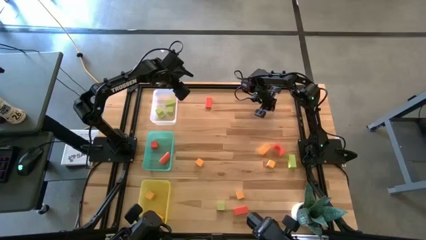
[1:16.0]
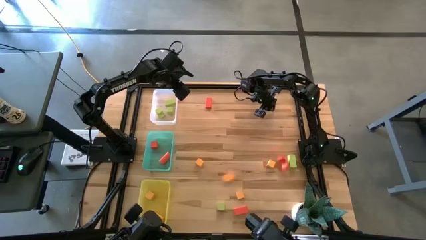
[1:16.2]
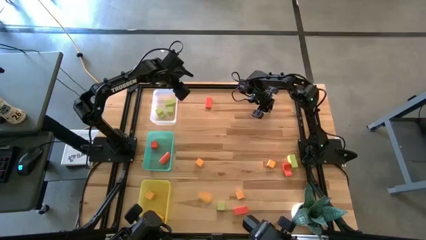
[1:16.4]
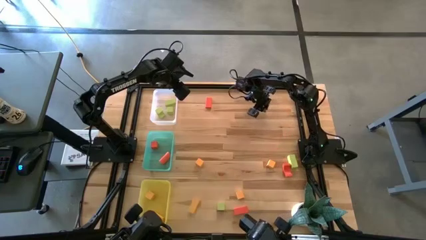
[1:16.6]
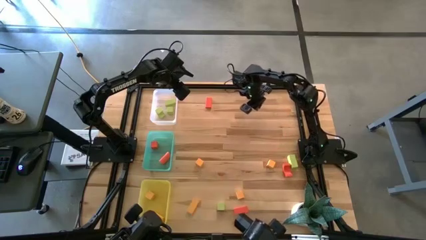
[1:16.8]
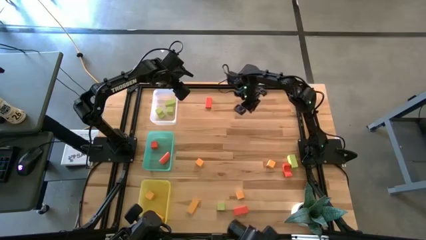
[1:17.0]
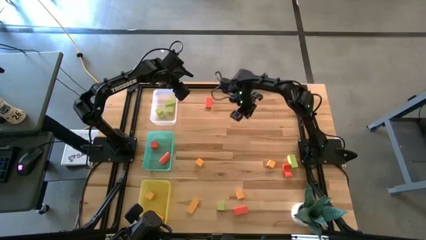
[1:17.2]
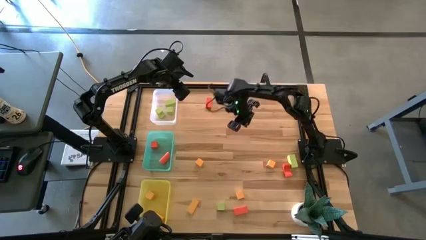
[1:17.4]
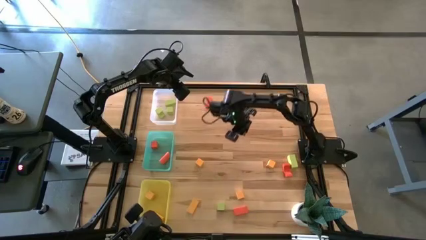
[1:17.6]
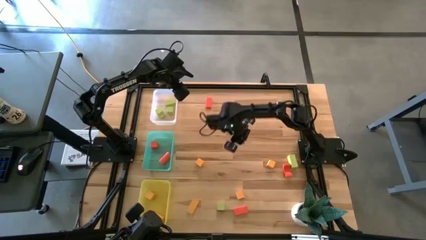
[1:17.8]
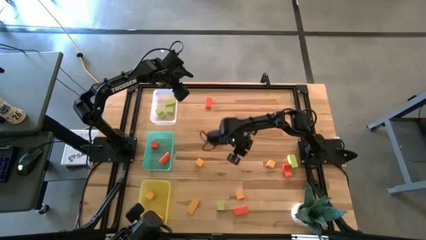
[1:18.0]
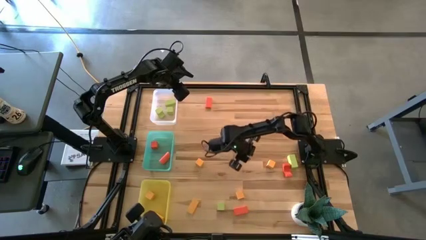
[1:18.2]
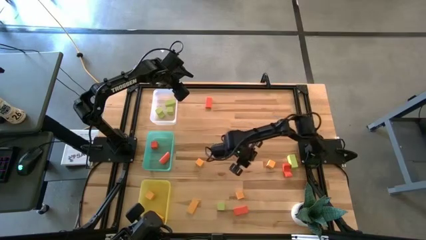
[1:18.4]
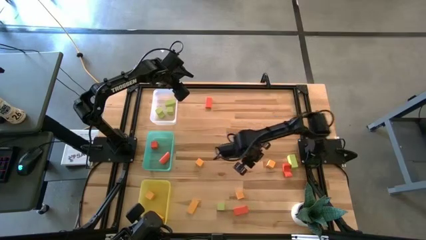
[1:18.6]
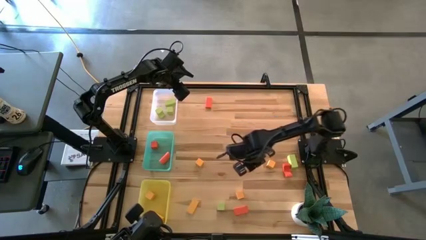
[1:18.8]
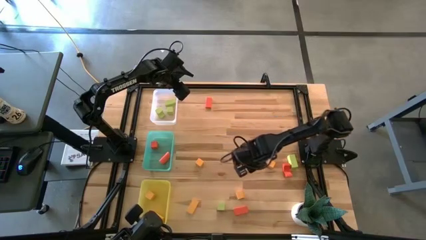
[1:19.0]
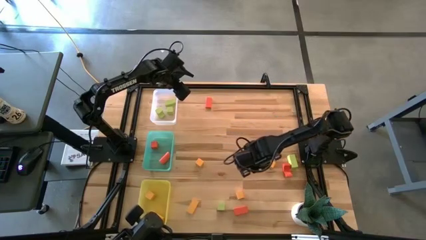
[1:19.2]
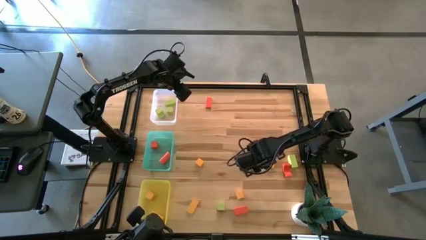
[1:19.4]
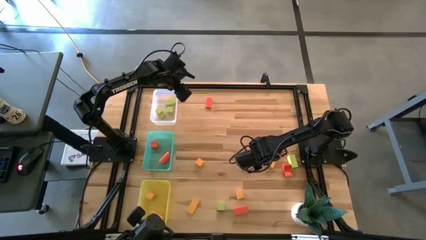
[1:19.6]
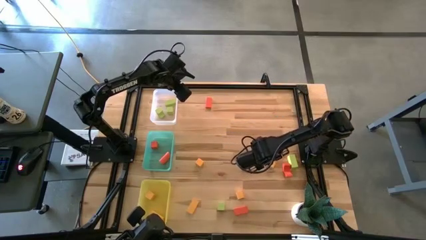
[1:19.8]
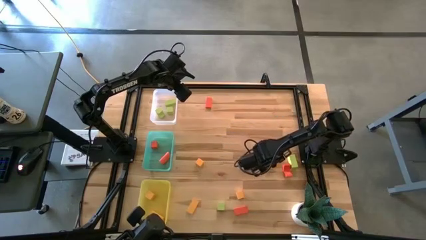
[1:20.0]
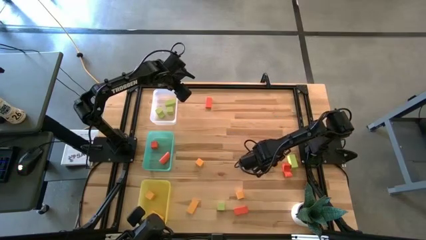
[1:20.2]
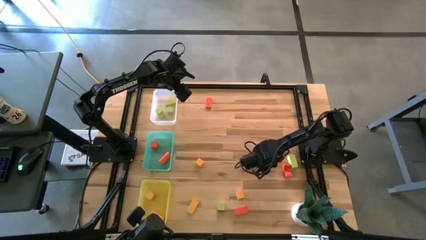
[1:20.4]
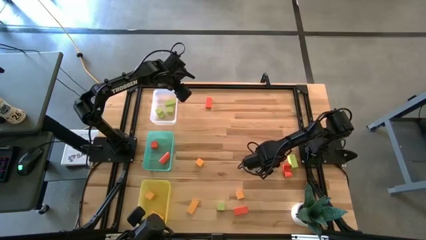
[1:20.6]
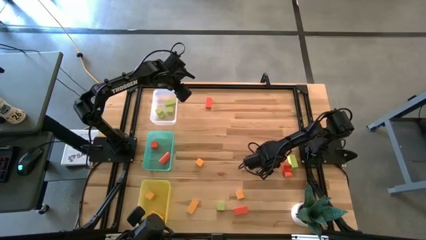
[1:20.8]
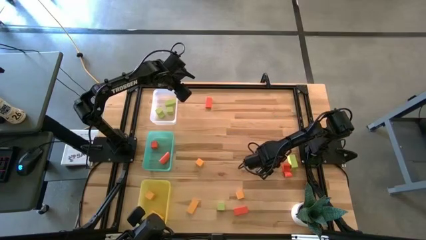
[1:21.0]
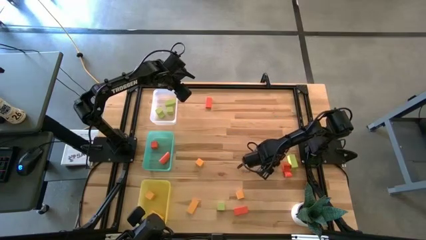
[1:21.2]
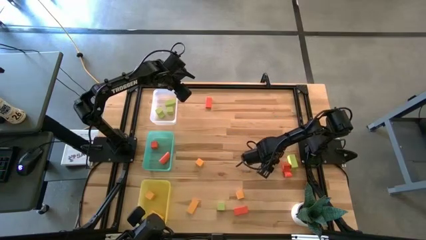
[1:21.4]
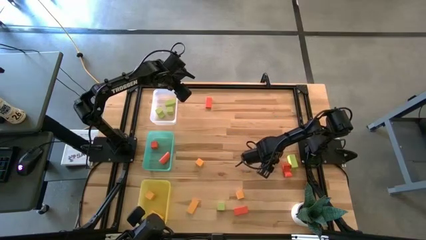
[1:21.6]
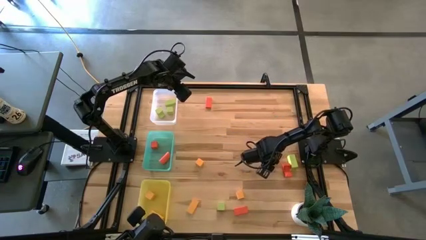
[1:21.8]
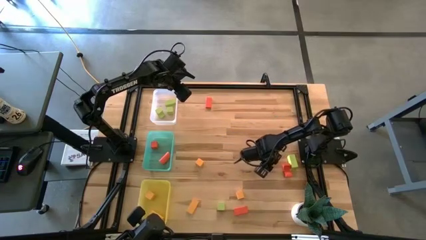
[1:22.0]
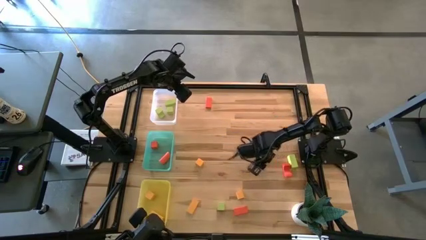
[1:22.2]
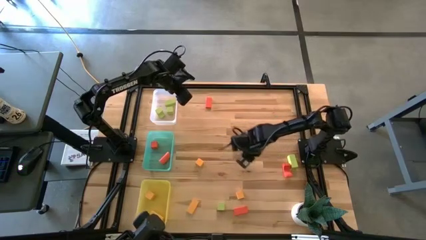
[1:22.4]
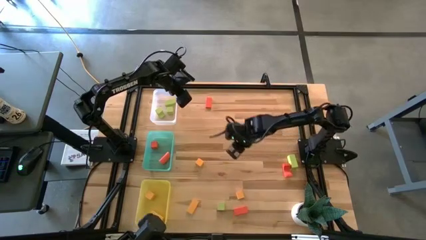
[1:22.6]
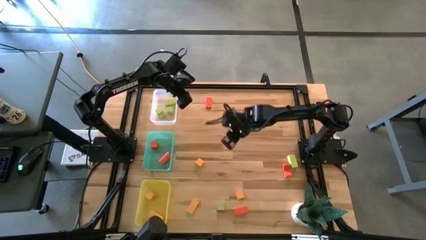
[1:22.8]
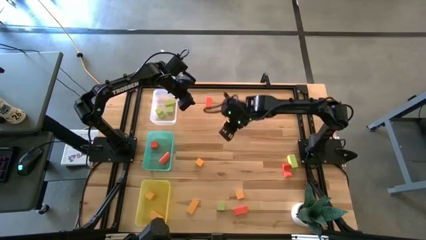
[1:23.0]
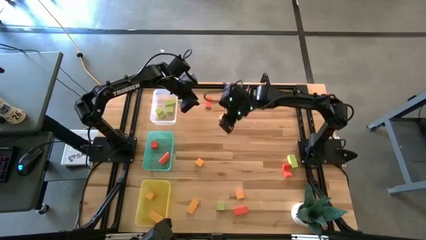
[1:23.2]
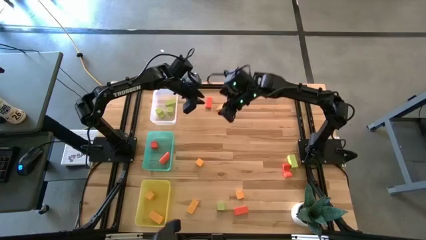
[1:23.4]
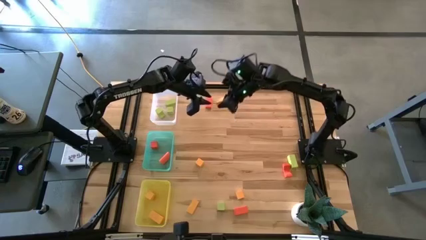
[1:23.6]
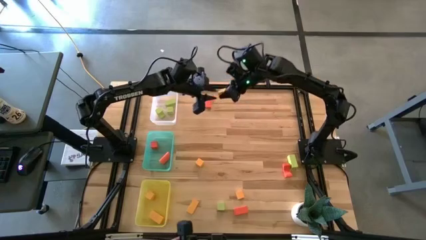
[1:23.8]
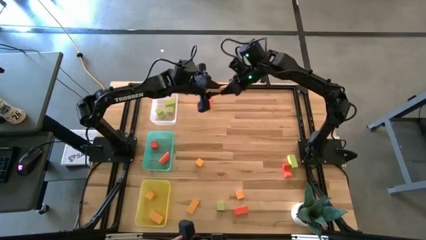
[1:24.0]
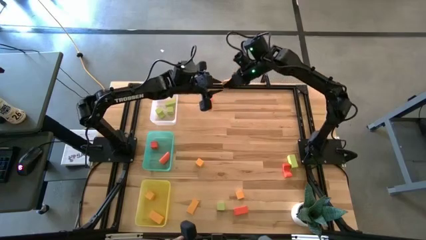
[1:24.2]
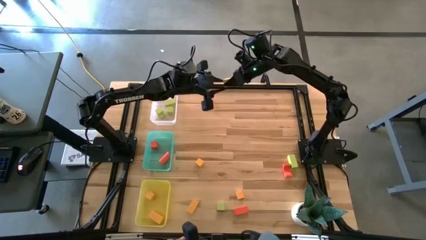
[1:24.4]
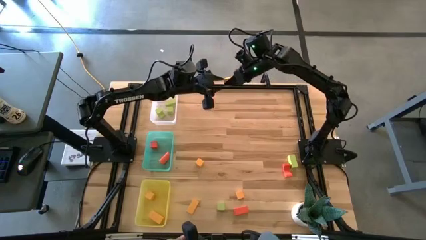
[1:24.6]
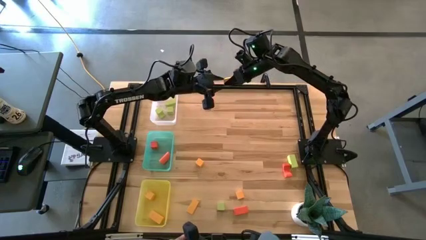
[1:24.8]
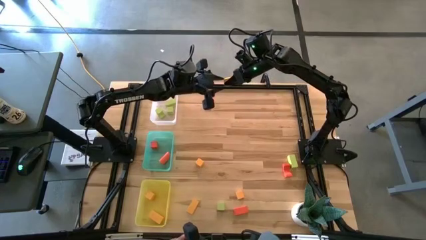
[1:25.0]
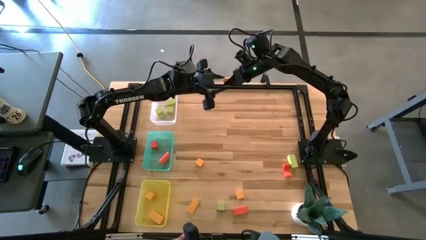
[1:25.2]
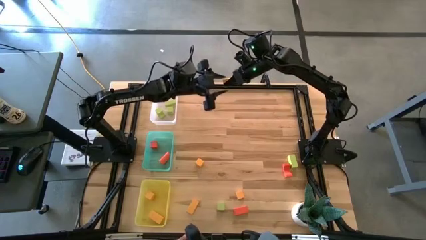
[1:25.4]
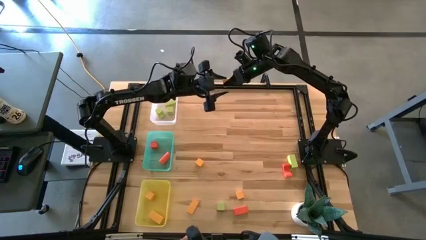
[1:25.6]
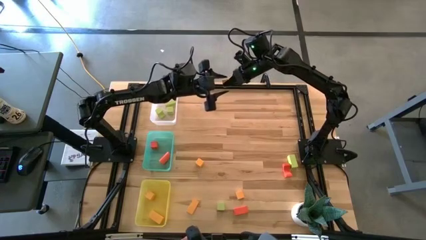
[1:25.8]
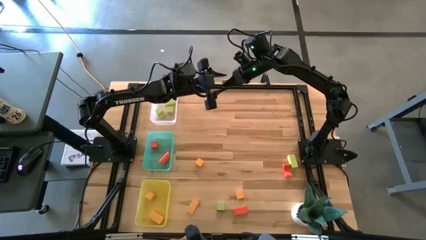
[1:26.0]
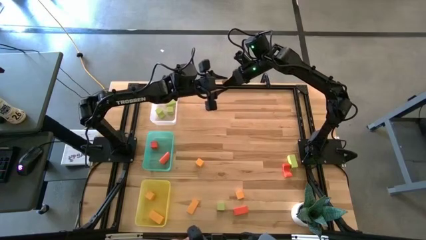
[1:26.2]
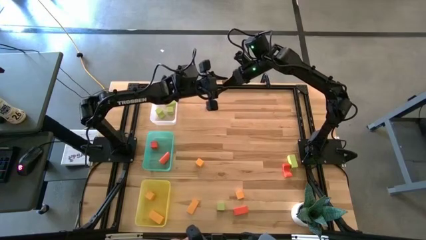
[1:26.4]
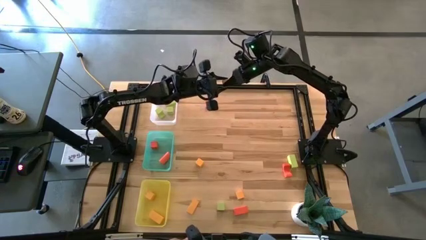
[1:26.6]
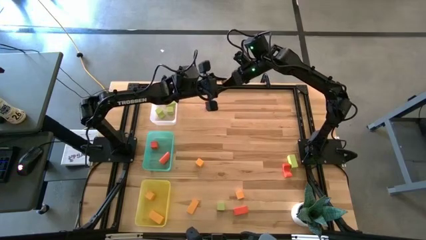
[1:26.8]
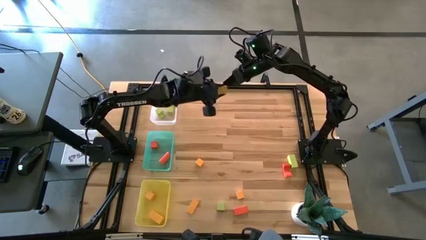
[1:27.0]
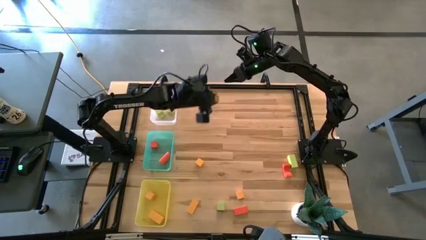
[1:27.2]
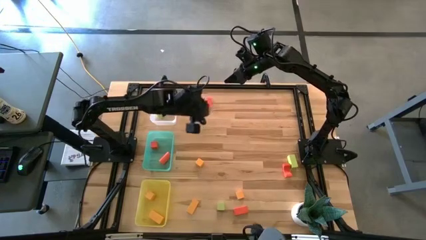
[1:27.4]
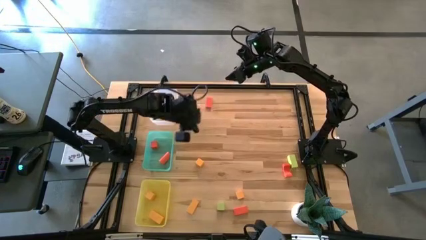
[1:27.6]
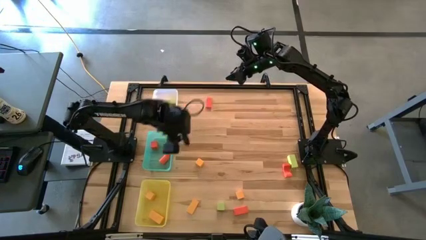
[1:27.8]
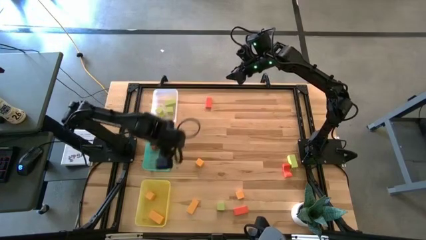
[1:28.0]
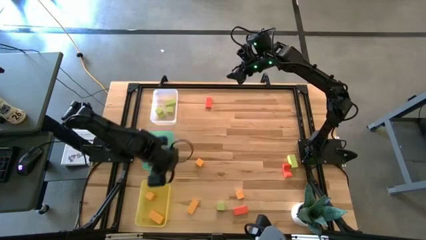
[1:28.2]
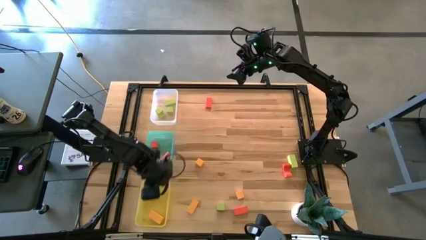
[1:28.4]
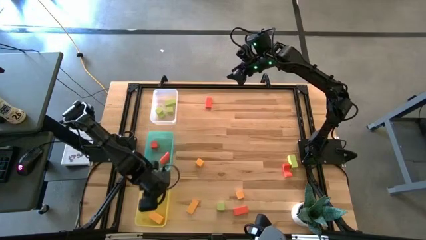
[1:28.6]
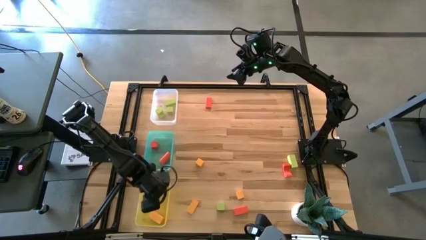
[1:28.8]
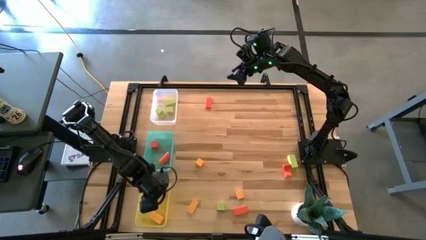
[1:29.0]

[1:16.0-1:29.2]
Task: Sort & place blocks by color
Put the yellow cube block into the yellow bin

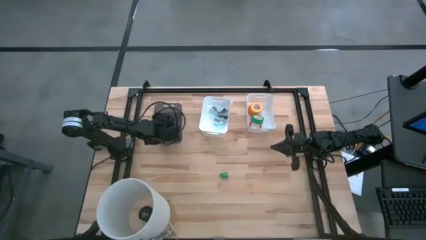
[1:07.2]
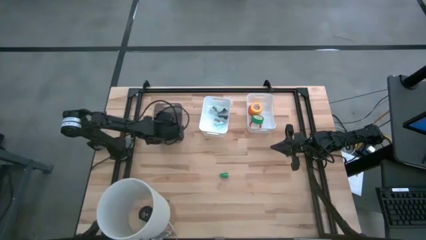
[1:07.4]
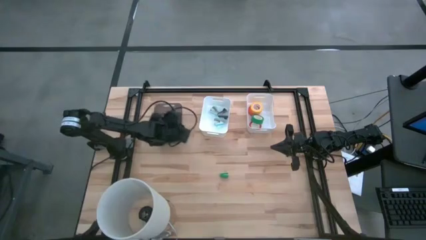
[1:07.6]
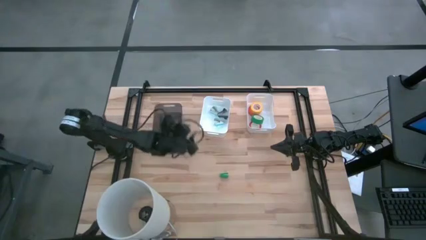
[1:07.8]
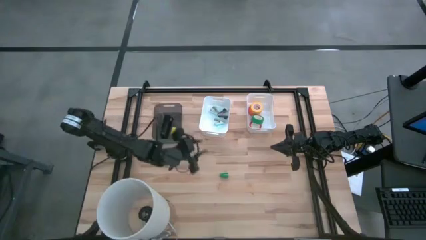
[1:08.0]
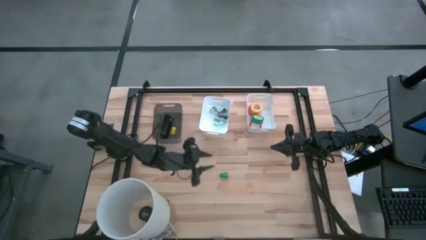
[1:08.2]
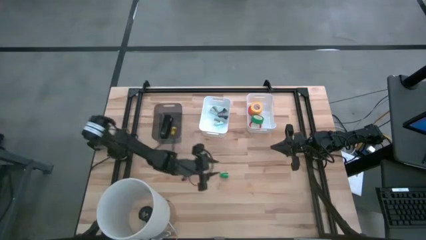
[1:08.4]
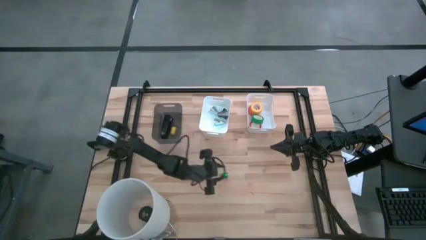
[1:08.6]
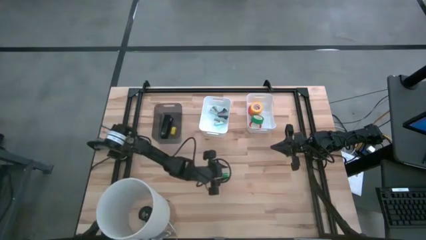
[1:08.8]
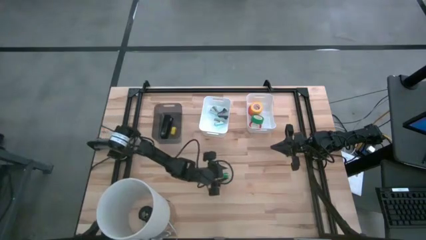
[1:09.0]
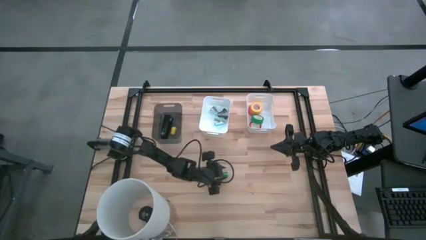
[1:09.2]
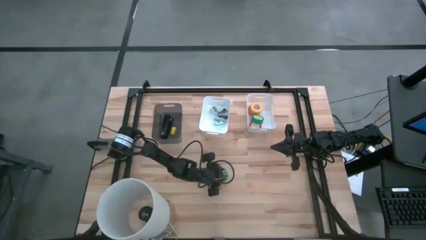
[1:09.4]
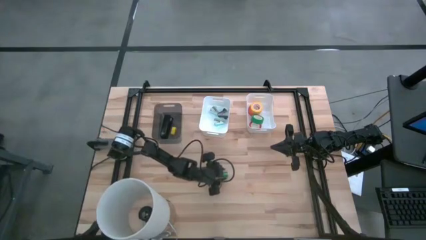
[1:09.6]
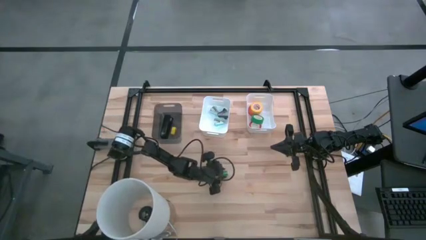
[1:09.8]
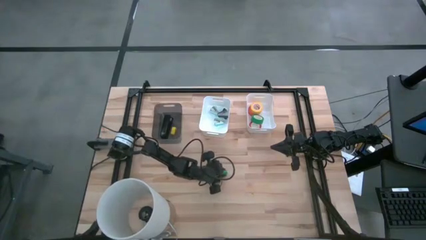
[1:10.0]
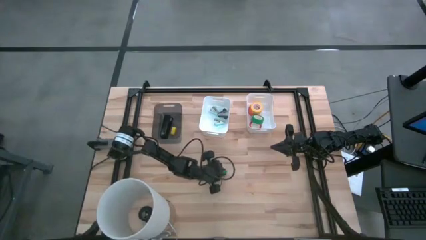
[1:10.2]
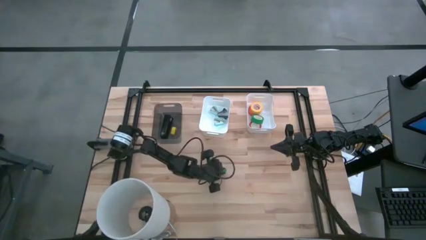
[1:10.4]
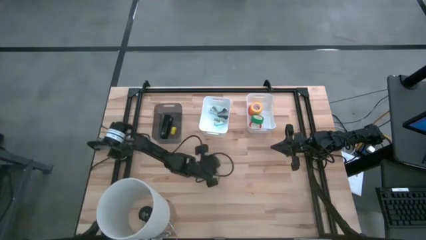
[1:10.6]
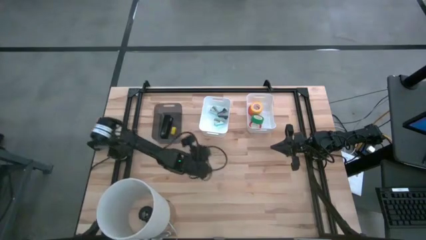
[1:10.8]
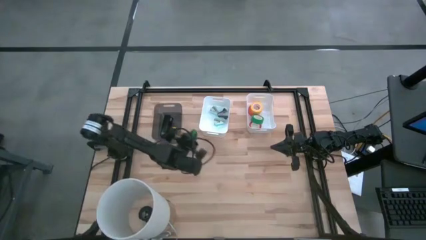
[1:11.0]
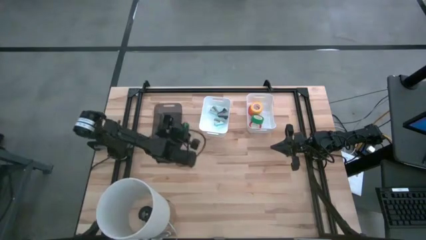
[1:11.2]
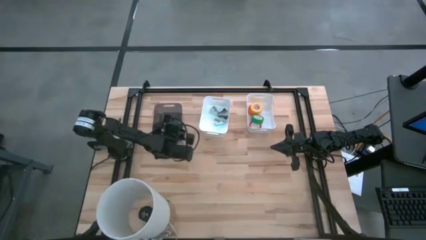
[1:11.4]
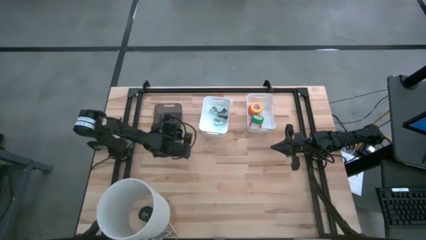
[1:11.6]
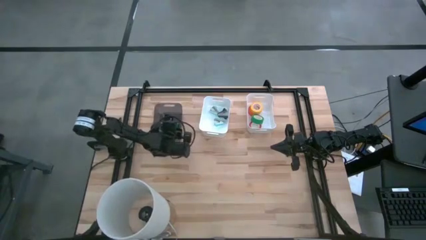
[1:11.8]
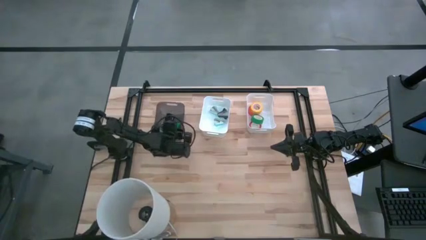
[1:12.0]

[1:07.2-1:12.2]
Task: Pick and place Stapler, Stapler remover, tape
Put the green stapler into the black bin
